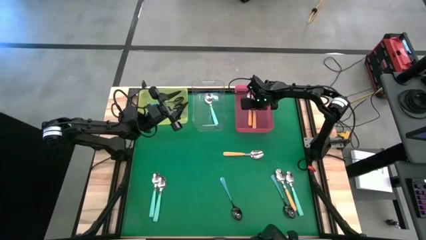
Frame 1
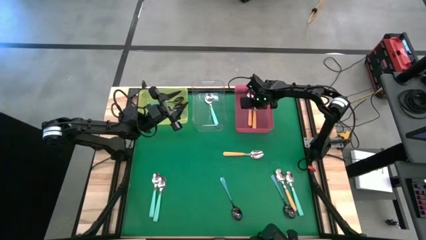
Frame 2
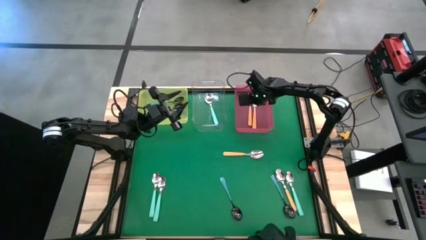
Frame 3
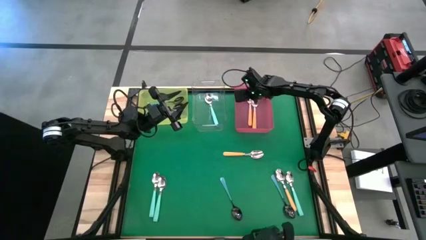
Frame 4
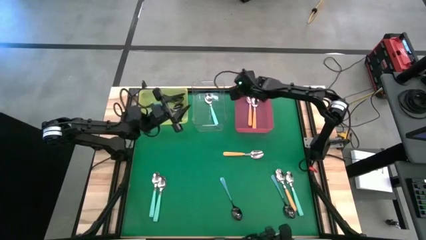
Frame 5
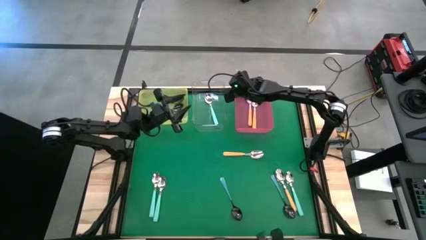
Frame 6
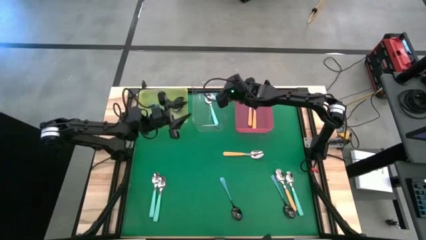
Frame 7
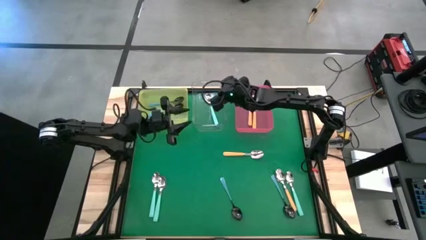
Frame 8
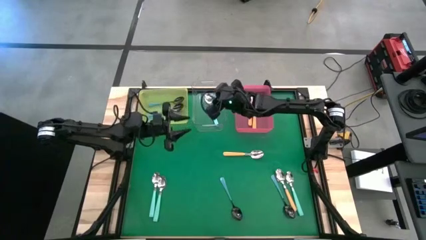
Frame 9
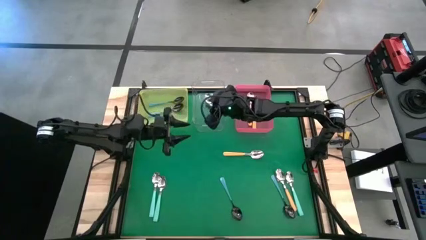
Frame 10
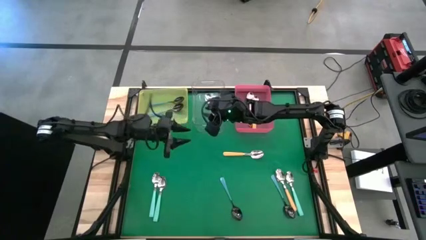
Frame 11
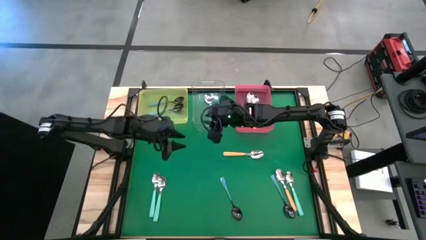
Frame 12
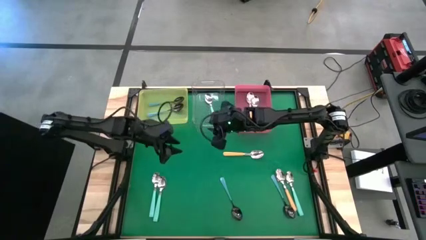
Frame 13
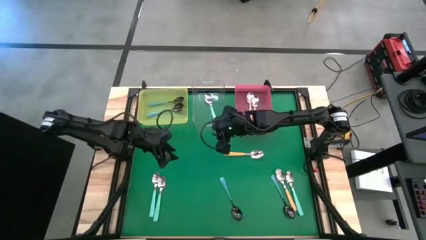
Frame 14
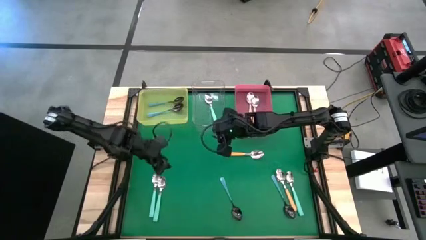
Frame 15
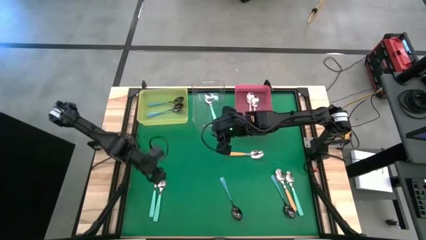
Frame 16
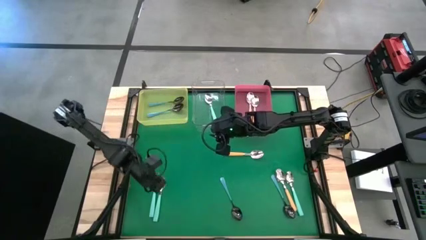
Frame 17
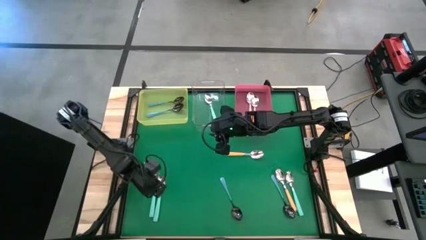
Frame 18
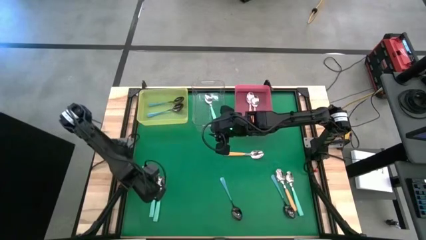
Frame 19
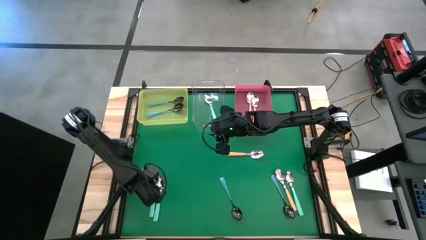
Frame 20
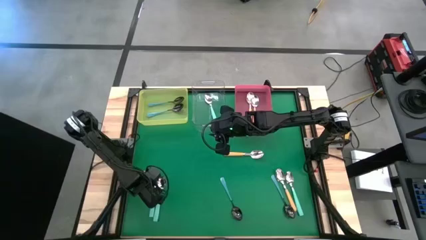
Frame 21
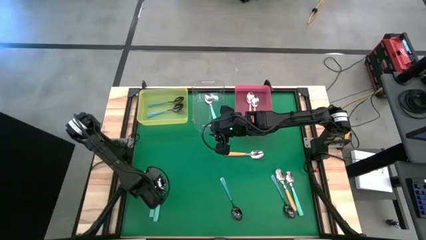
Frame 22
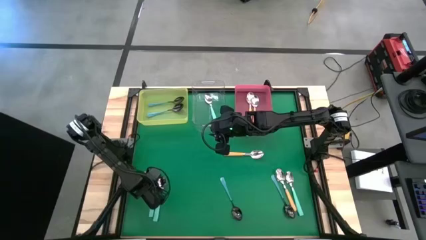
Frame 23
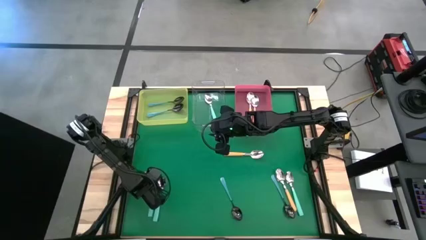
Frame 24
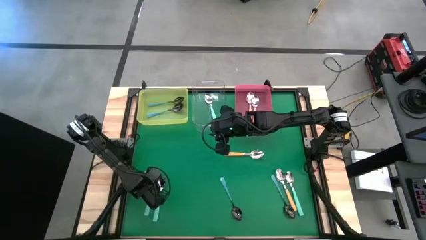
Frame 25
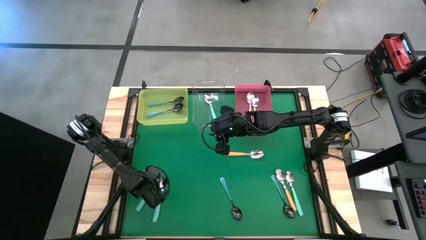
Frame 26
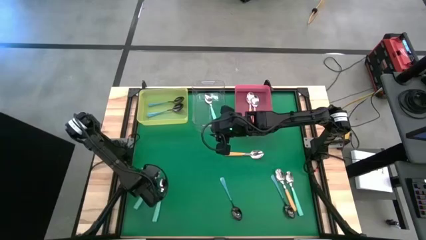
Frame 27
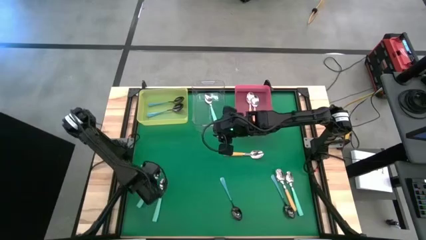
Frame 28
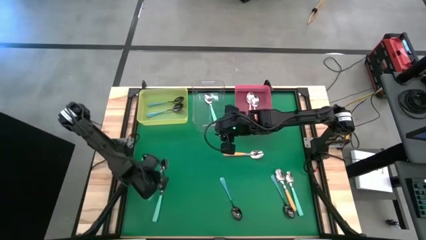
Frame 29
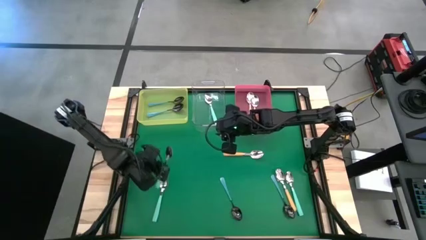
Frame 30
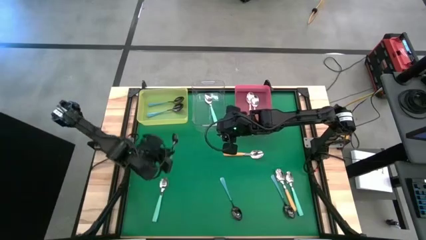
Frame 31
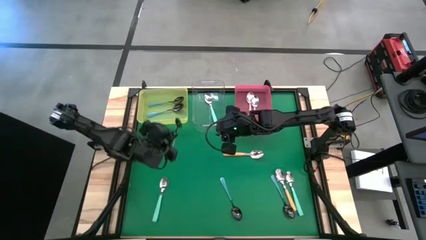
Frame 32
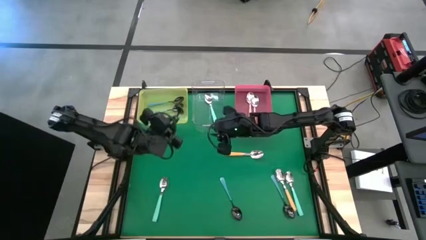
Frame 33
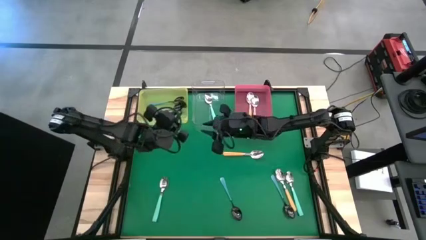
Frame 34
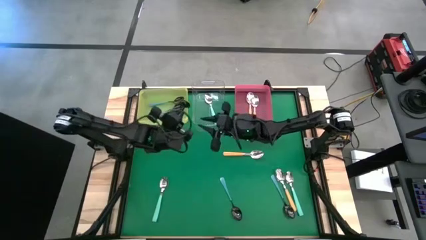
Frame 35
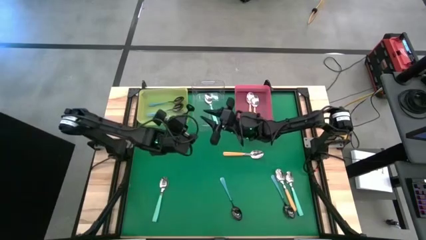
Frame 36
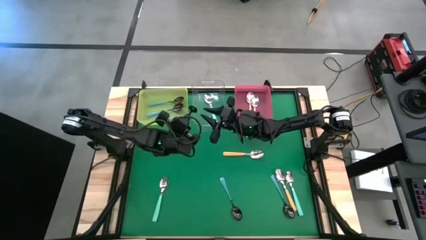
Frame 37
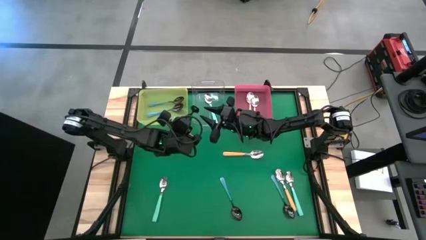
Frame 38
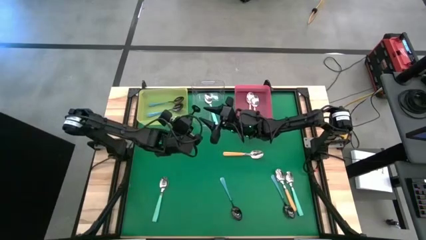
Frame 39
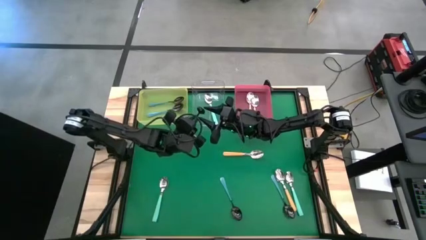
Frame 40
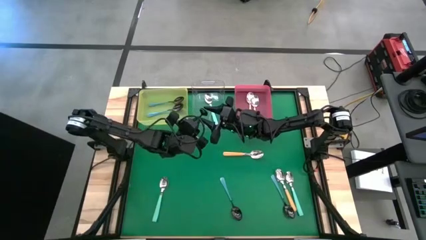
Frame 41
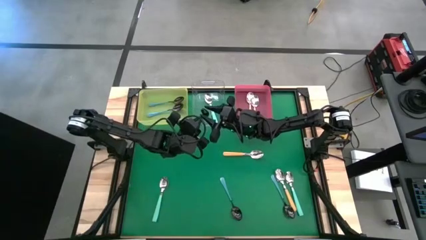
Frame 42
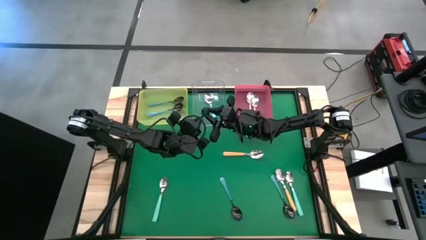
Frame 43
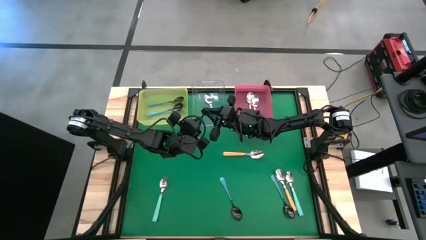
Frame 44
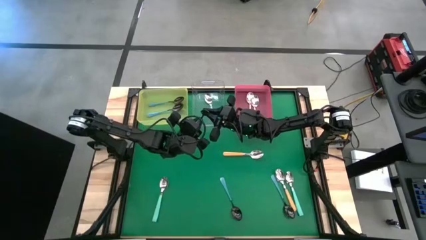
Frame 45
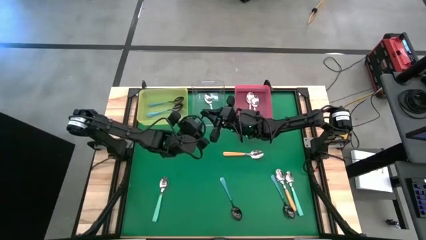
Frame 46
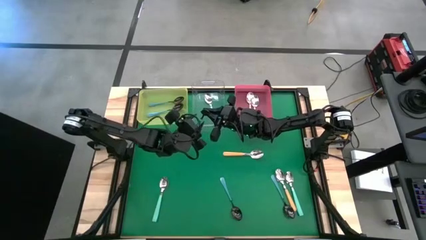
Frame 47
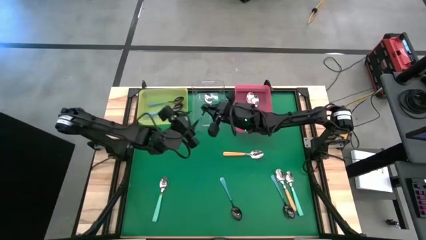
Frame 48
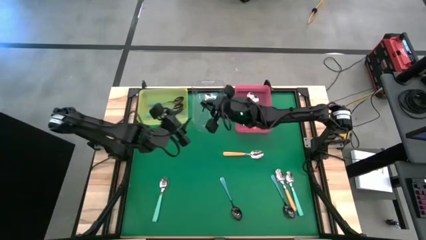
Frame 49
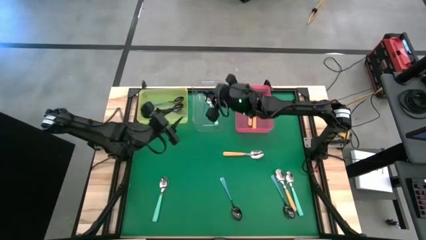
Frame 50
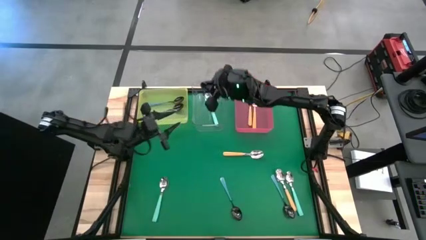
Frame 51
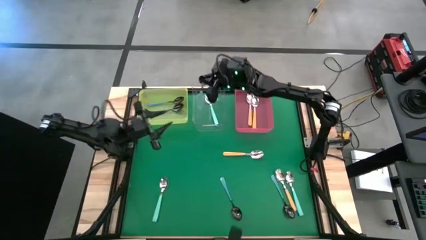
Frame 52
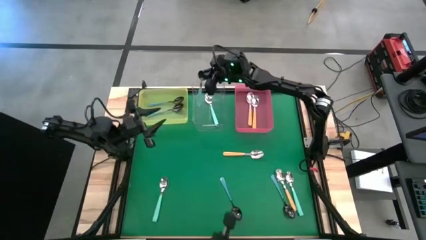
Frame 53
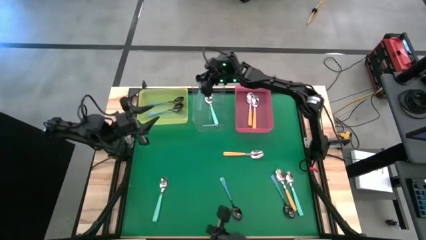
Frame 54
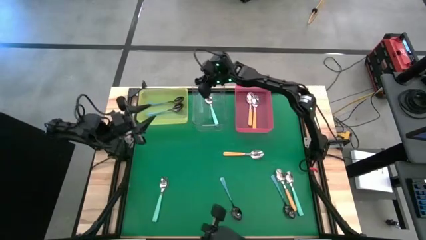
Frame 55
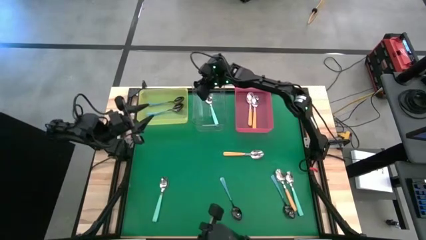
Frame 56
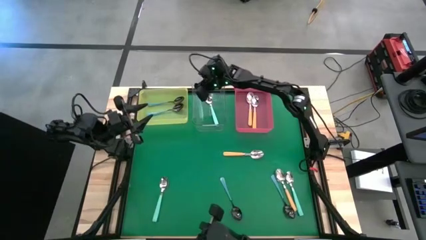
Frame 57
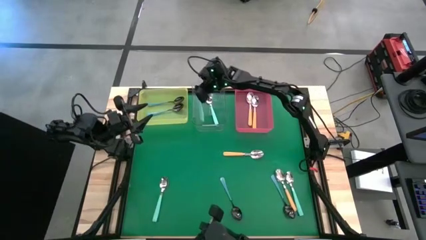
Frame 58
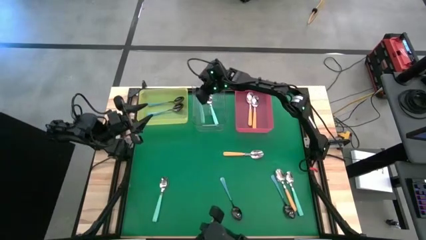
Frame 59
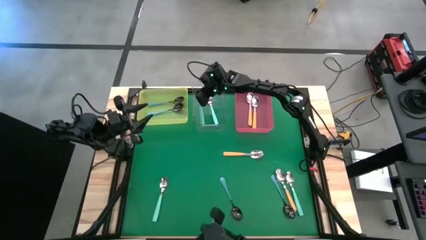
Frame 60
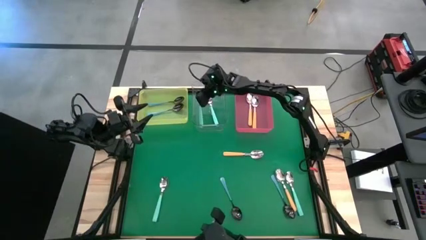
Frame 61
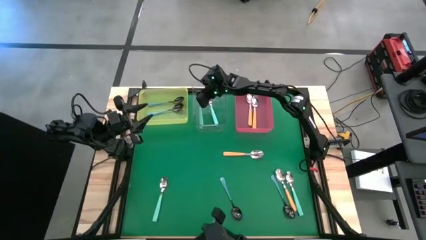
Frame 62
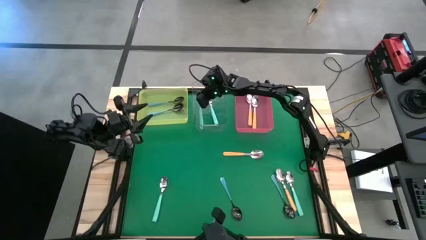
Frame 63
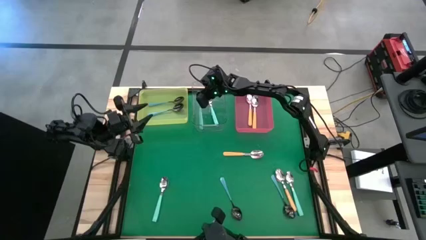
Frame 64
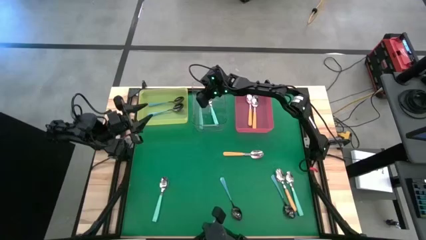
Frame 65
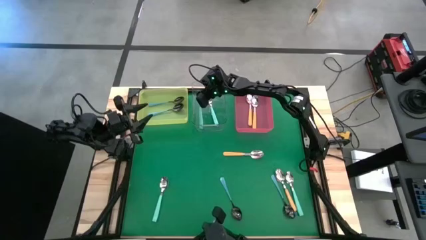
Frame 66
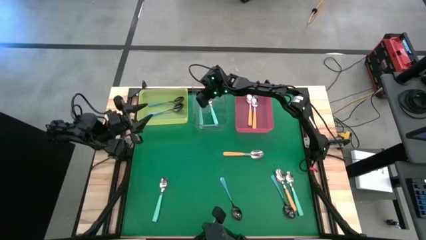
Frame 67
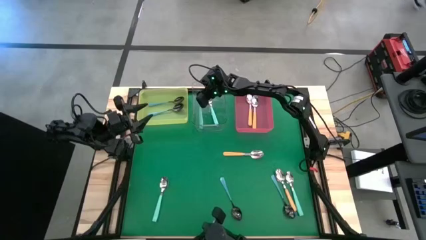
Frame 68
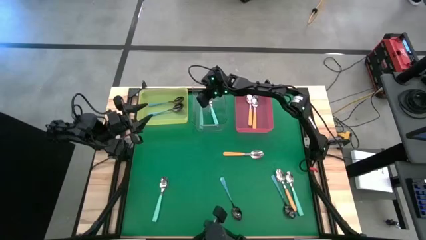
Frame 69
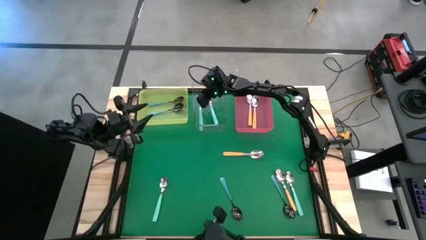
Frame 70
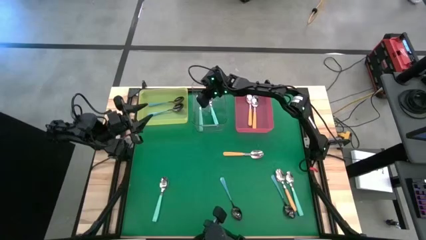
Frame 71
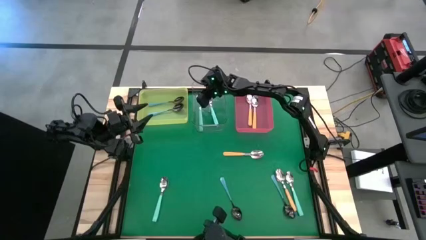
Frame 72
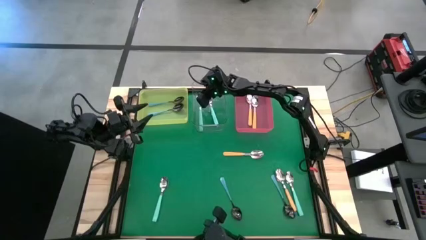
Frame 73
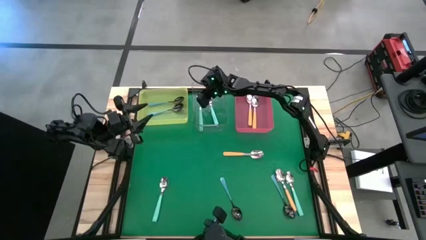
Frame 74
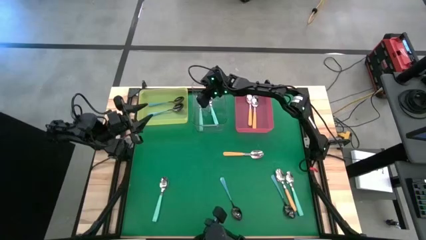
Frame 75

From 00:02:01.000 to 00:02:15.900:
Task: Sort silverware by color (type)
Put the green spoon into the transparent bin
